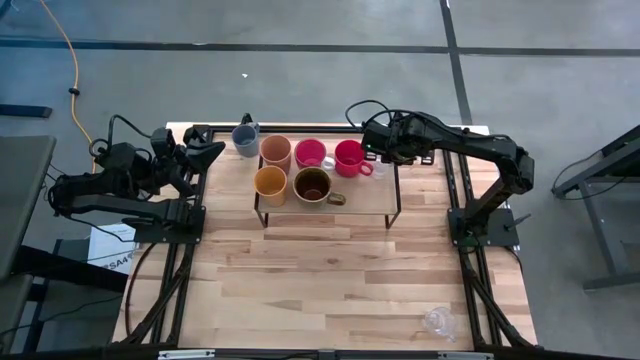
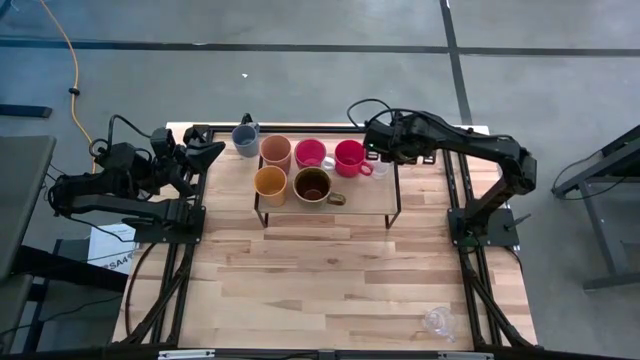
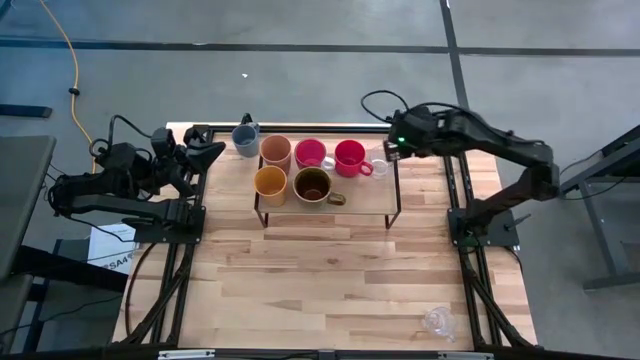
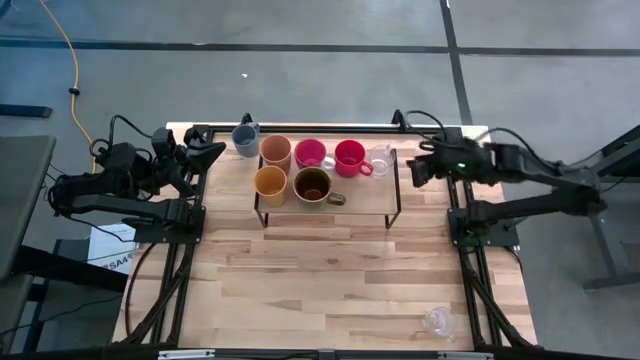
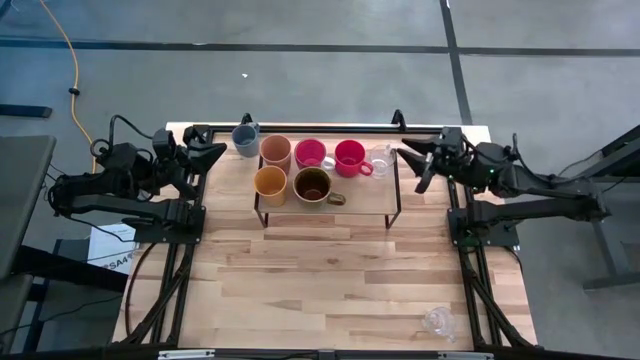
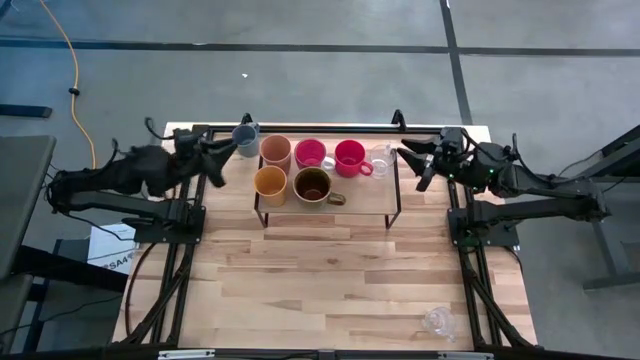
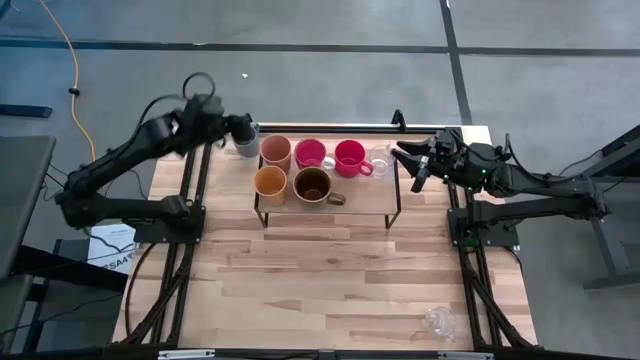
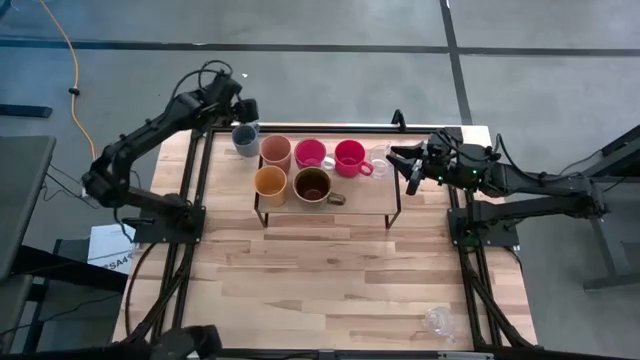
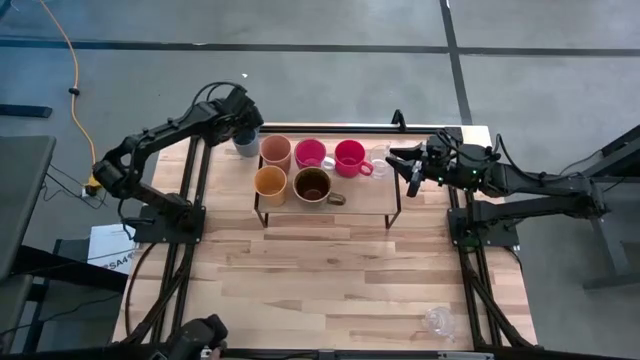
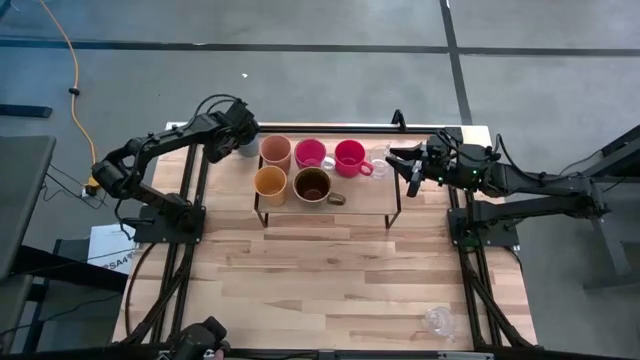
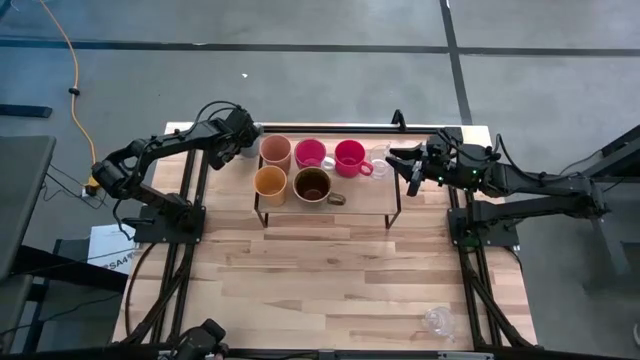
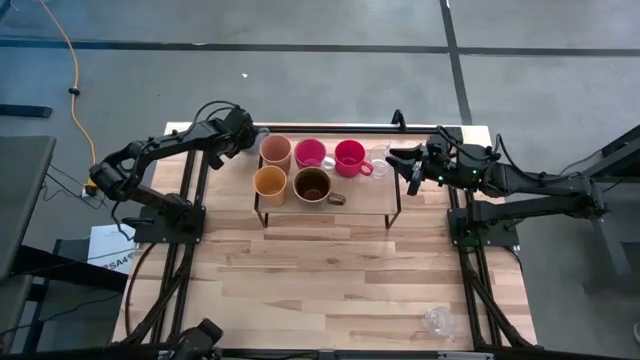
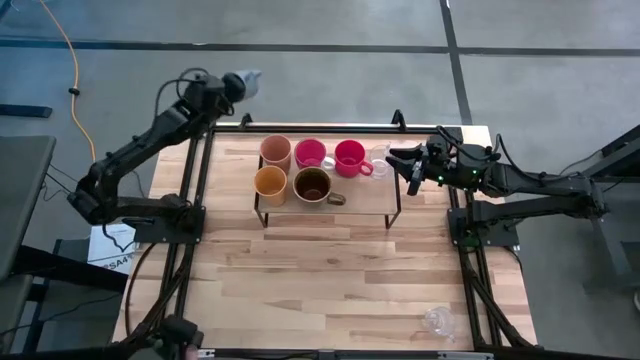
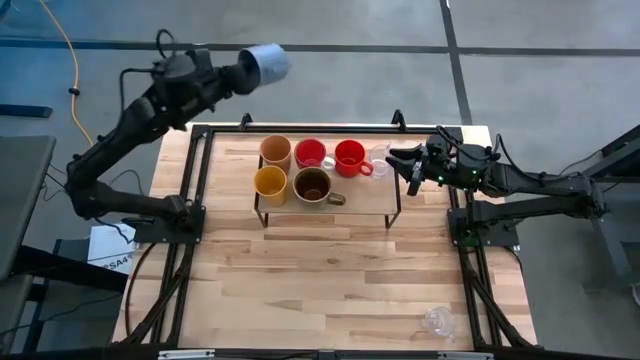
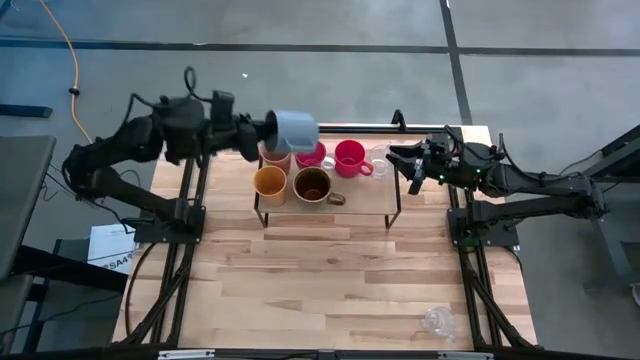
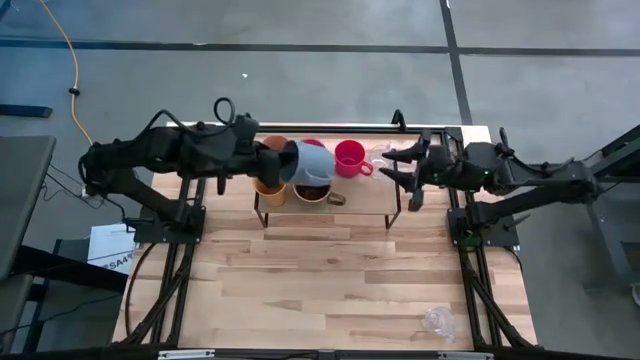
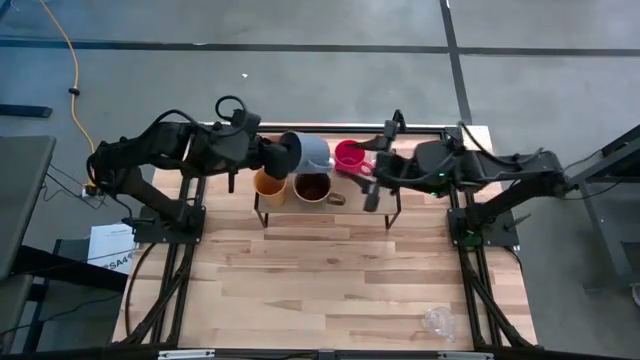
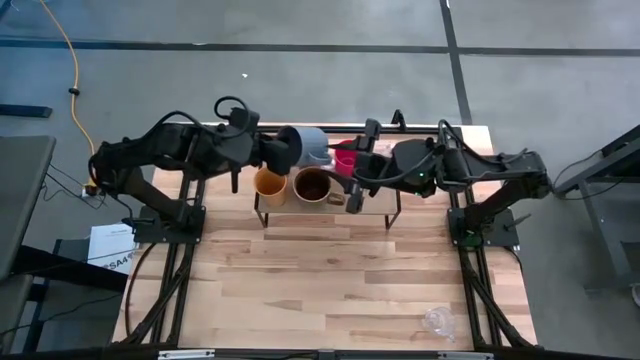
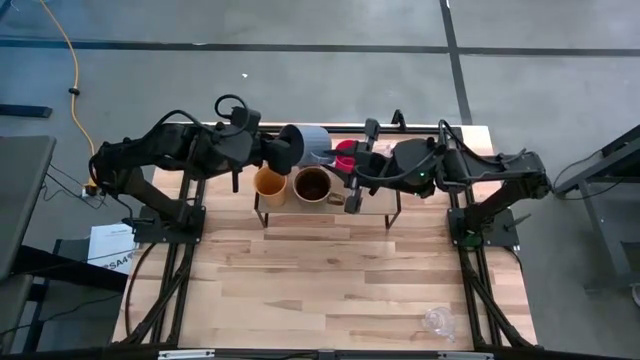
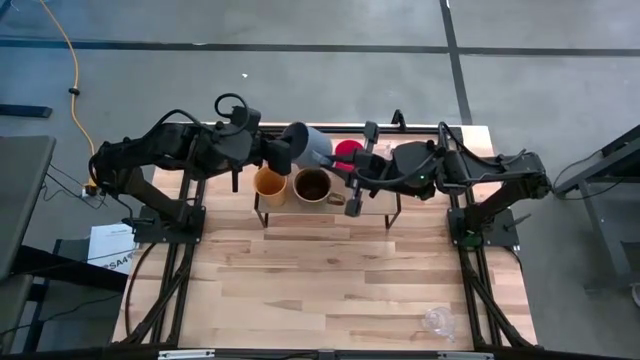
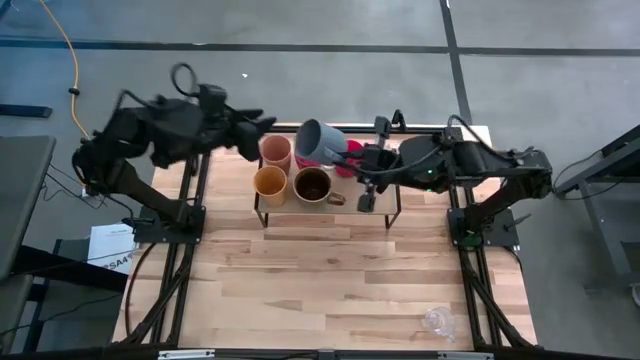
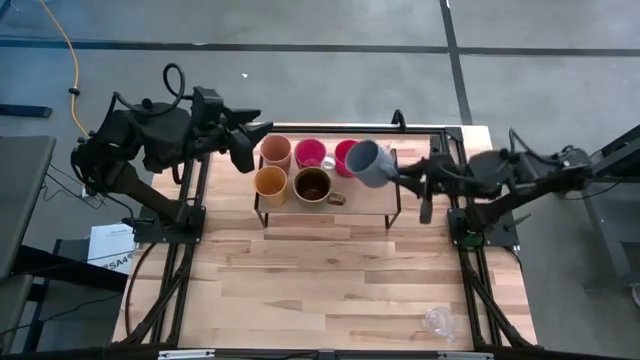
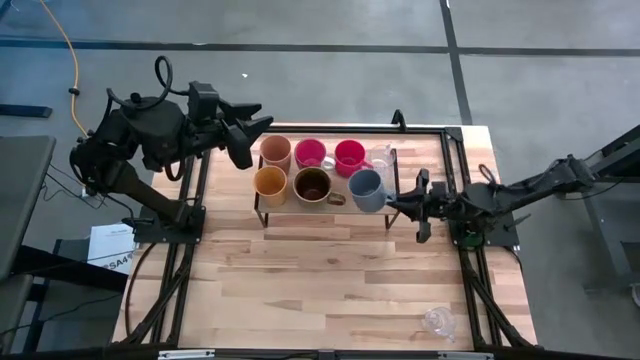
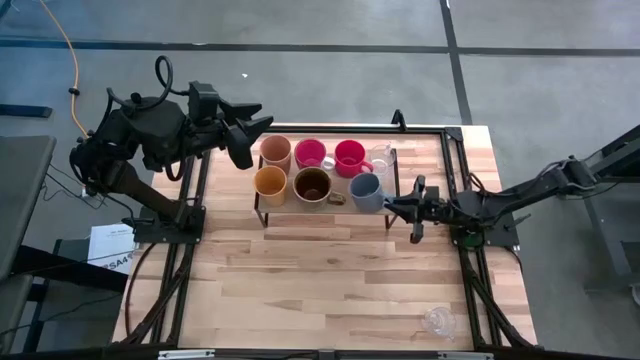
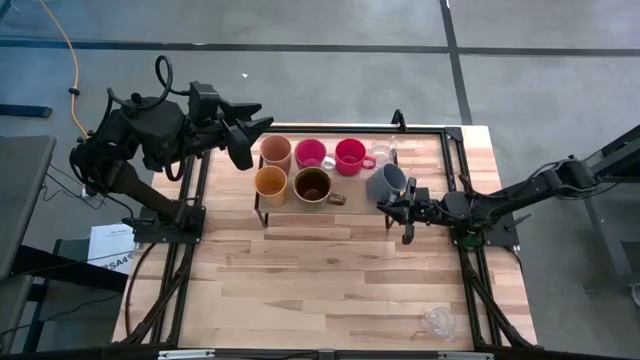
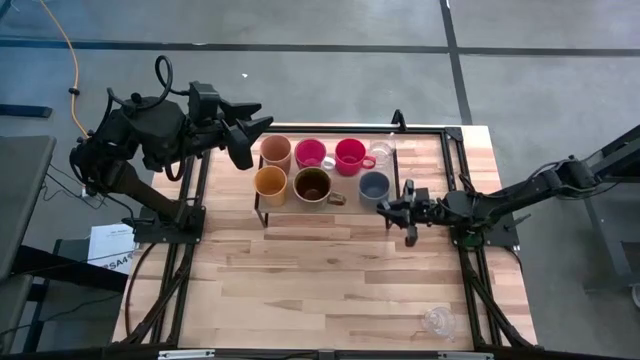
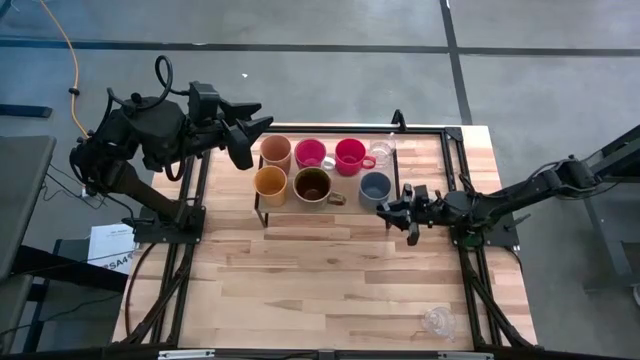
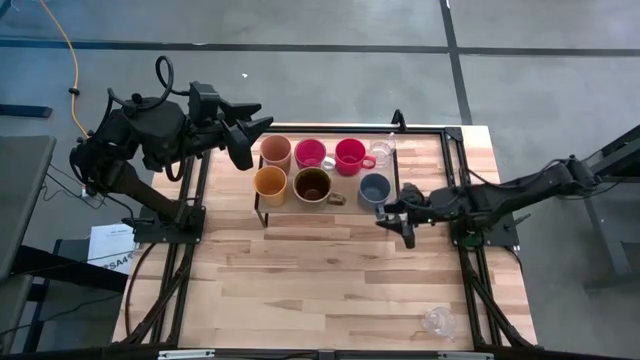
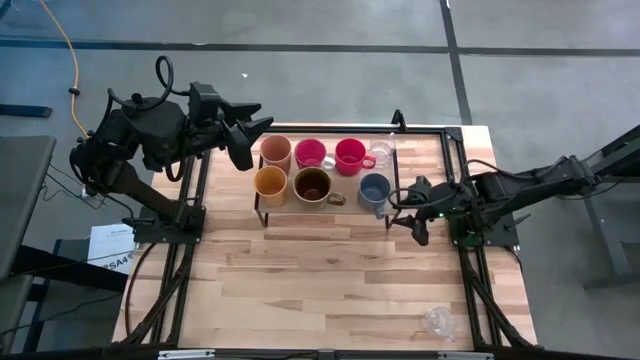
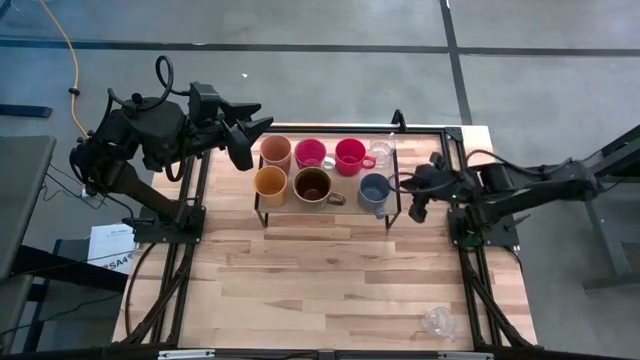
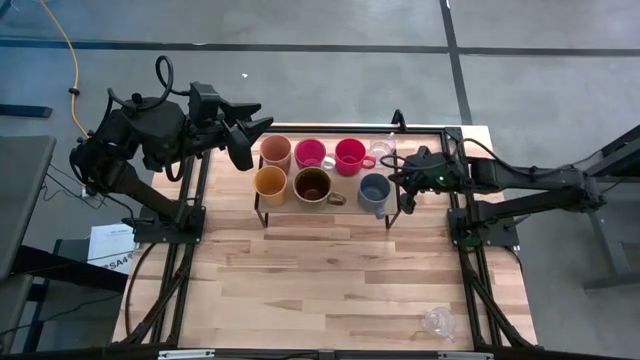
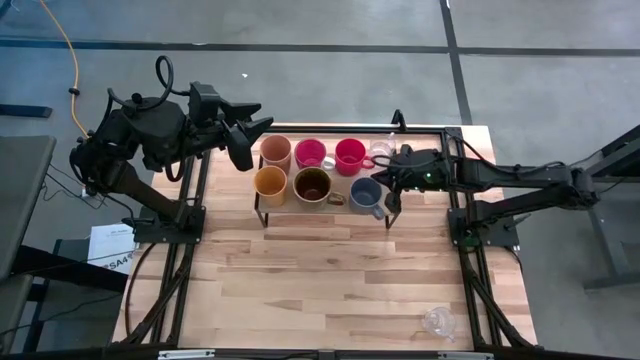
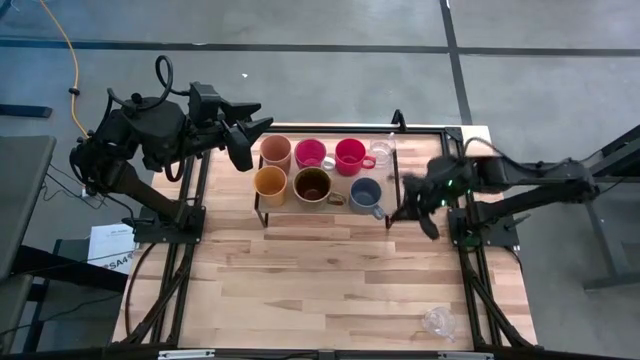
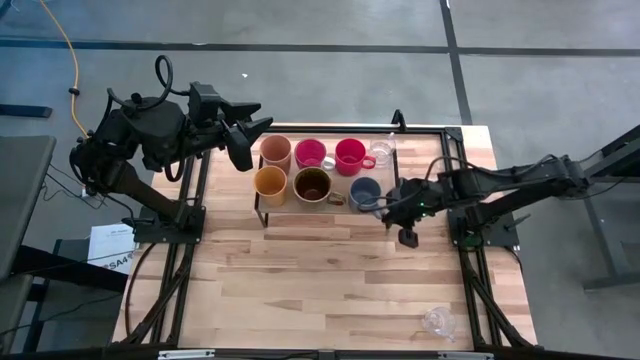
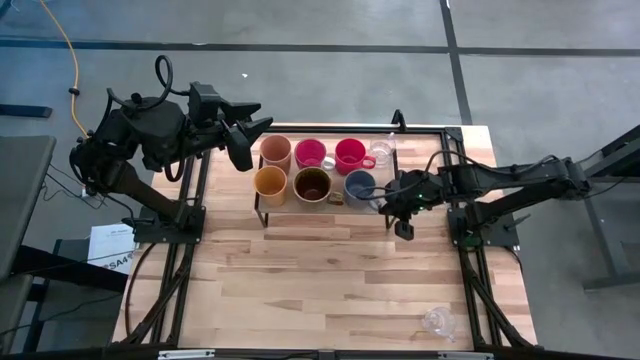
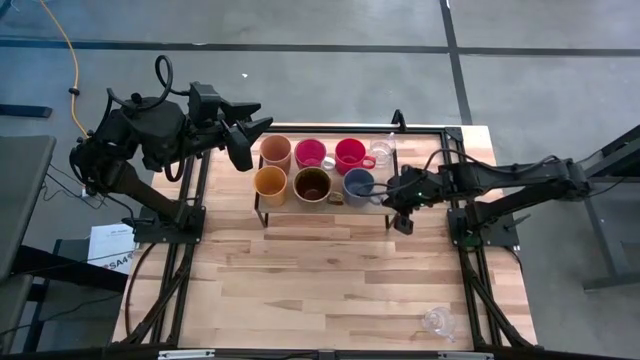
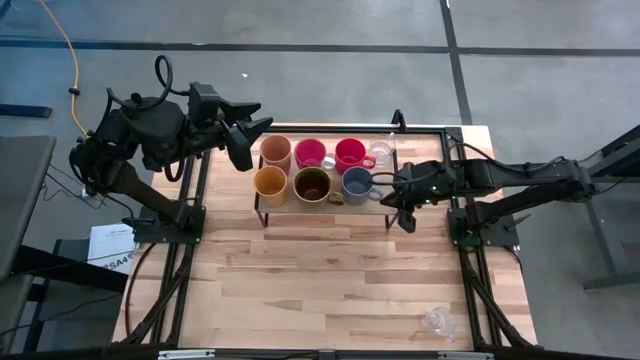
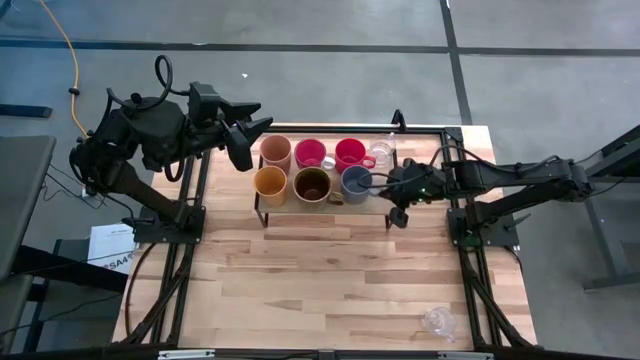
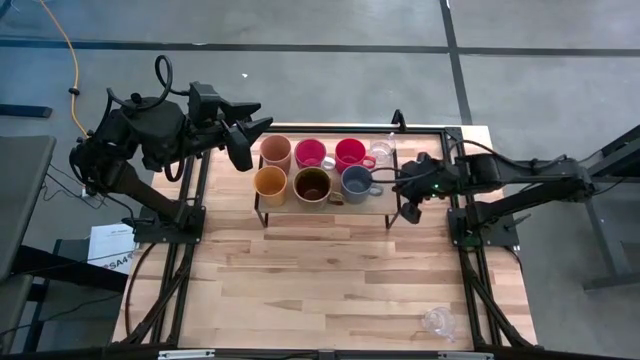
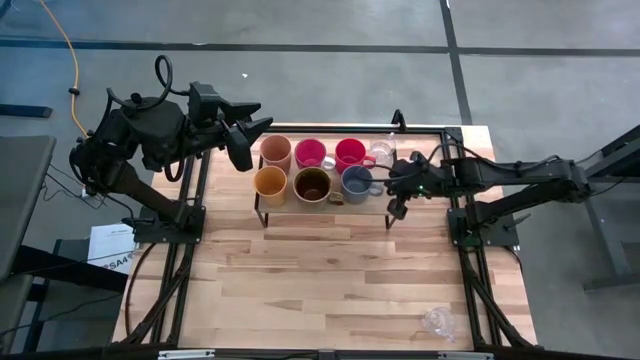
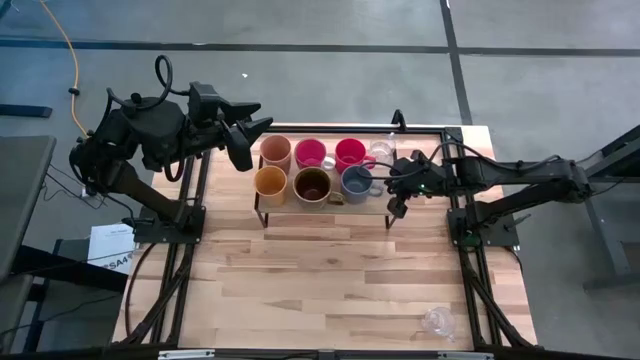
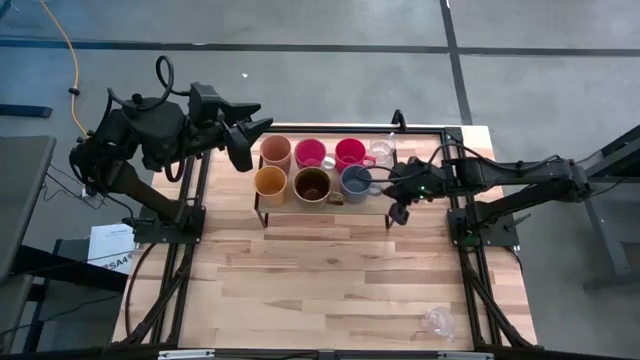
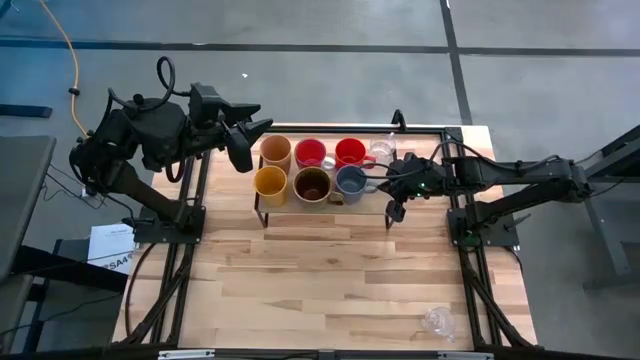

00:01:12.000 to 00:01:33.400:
Task: Stack small to large cups/mugs on shelf
Put the gray mug on the shelf
